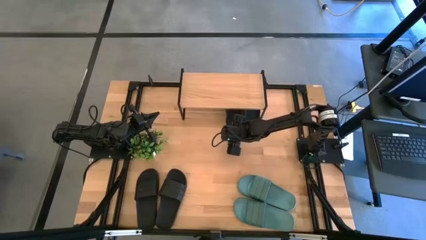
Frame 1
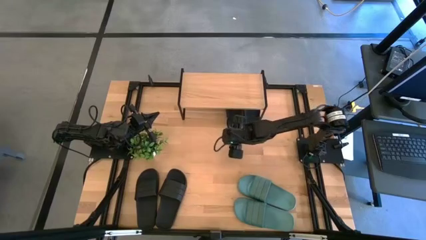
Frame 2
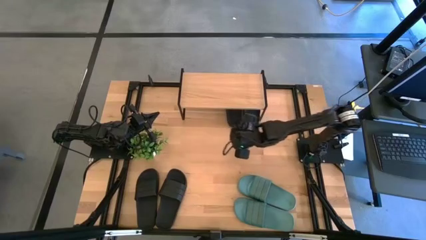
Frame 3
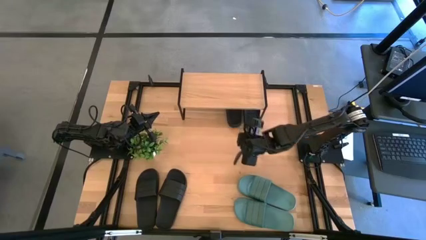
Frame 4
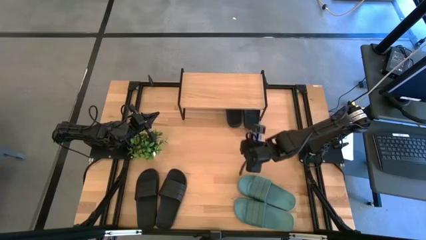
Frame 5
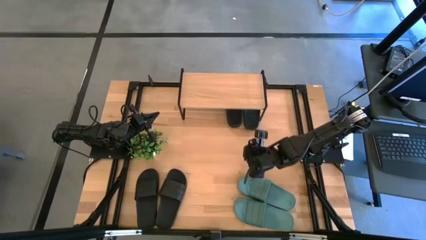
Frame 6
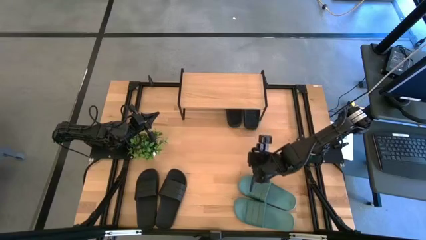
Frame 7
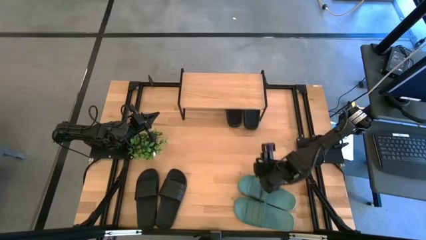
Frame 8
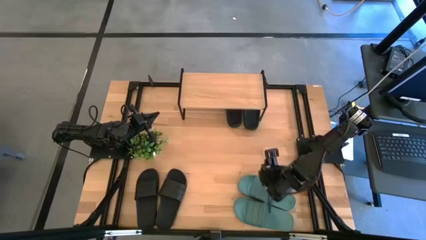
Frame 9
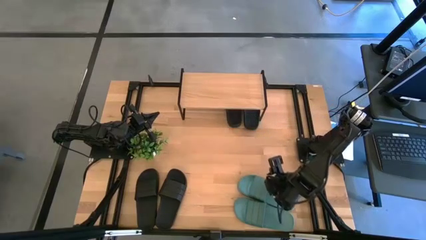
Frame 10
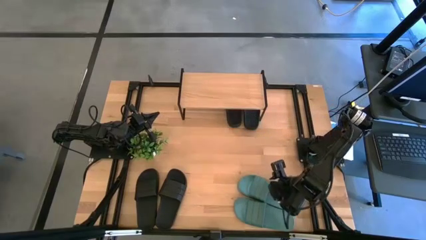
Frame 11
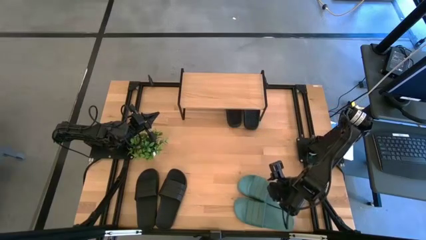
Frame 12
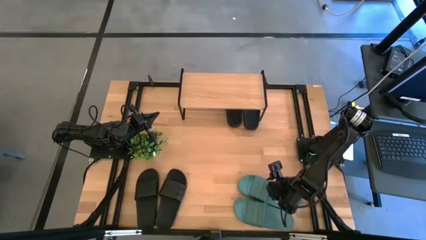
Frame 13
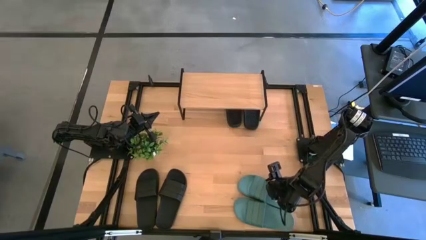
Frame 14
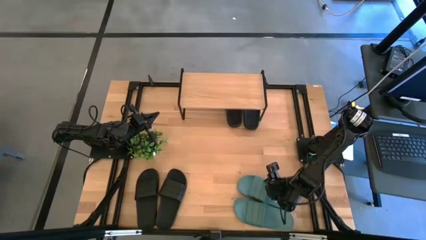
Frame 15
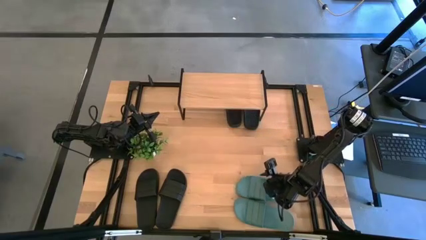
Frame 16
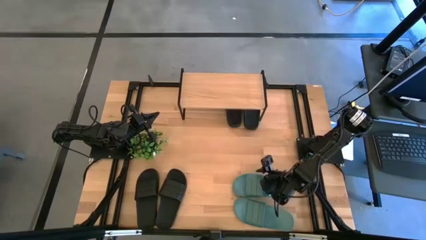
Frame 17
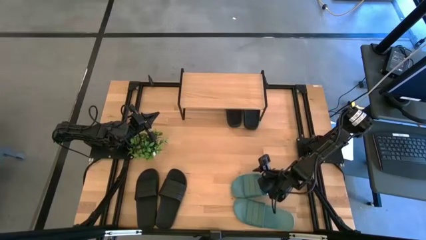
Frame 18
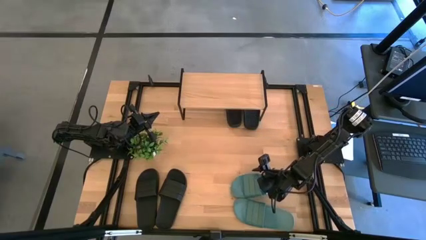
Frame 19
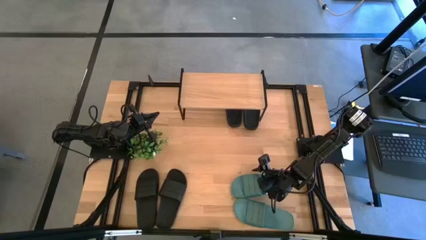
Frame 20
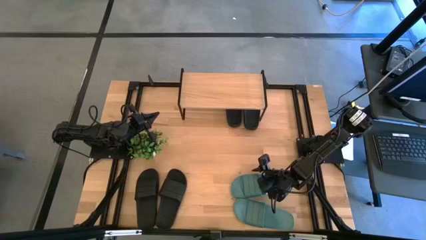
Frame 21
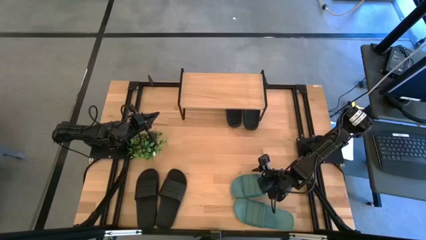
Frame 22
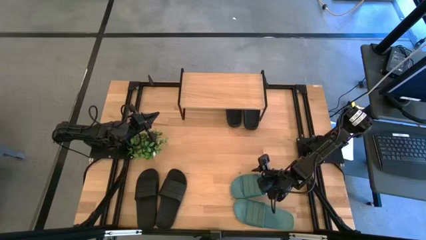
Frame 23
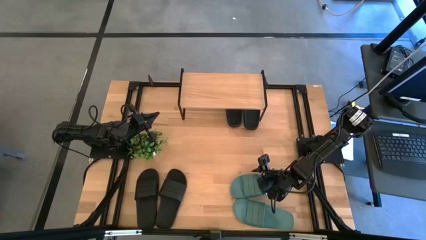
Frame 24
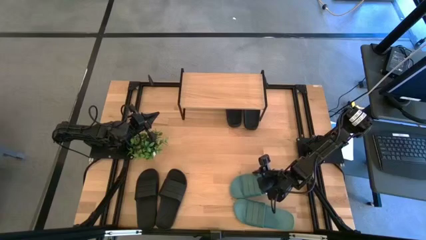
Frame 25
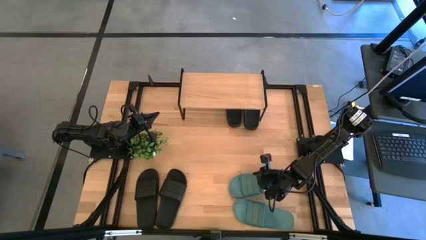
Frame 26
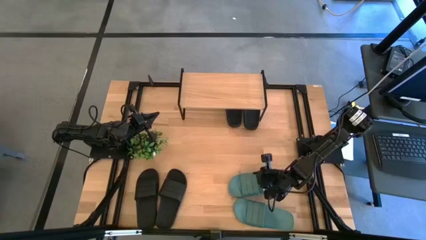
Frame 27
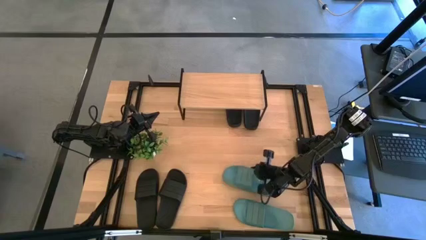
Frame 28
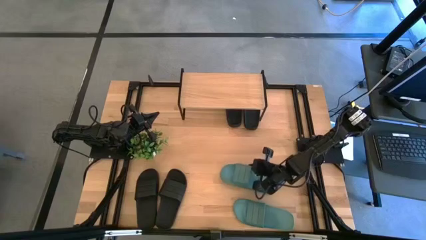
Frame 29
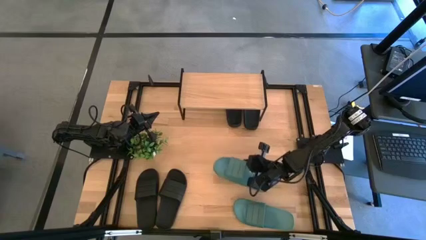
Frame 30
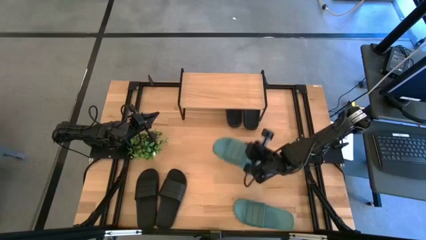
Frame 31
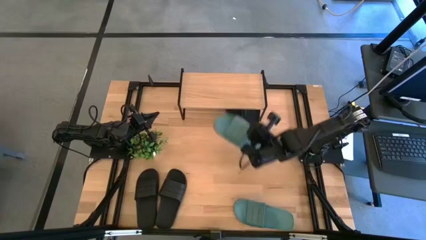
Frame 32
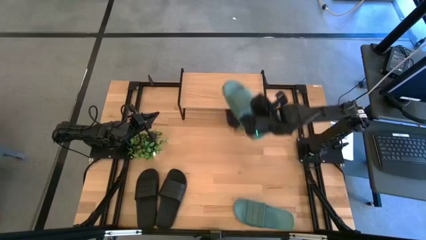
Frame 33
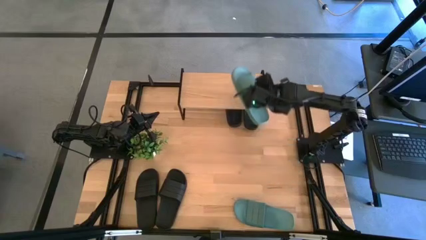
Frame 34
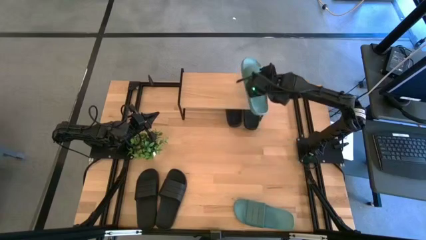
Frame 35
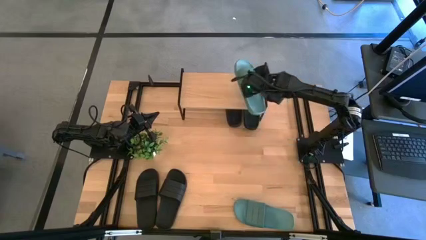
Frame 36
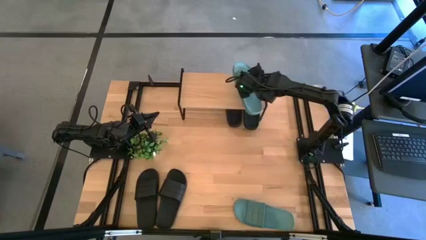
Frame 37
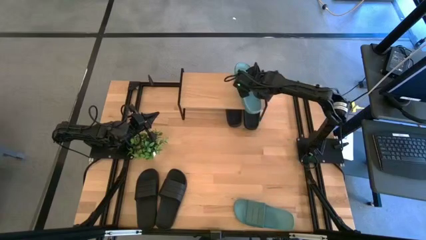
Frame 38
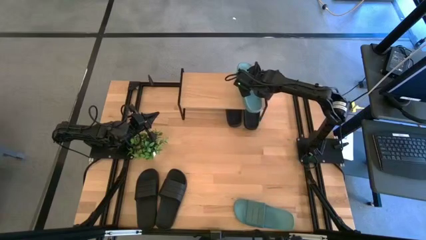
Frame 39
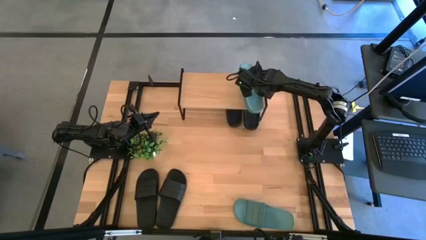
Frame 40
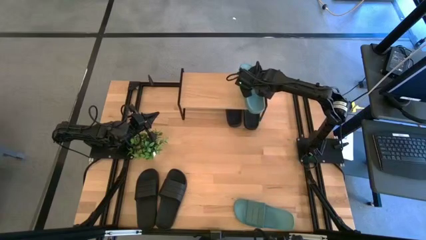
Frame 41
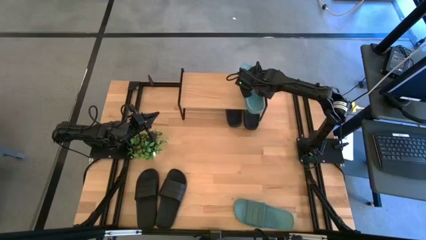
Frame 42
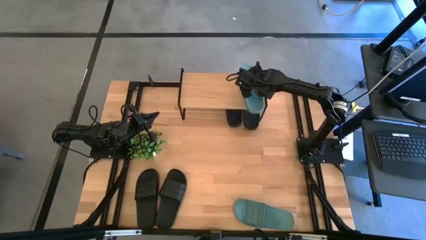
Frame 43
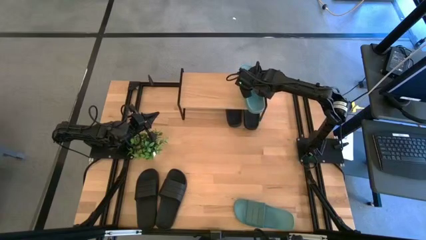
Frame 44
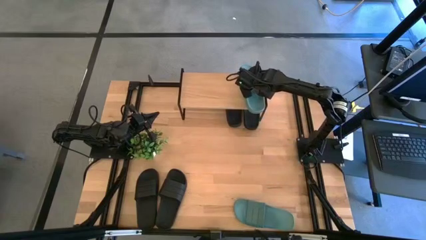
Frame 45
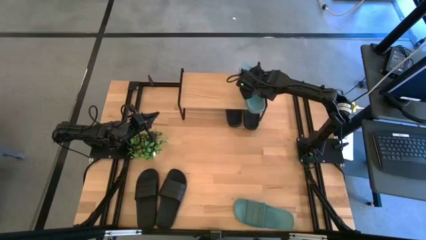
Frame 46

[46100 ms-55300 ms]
Task: Pick and place slides into the shelf
Put the green slide on the shelf
